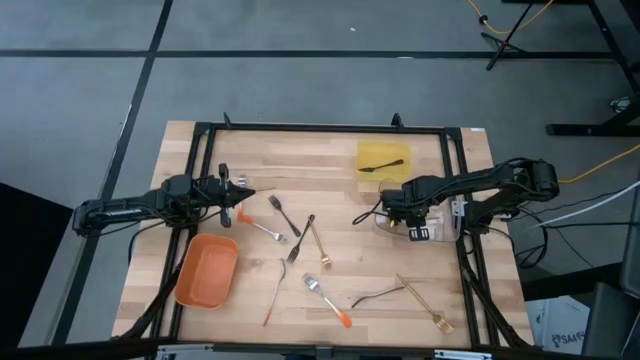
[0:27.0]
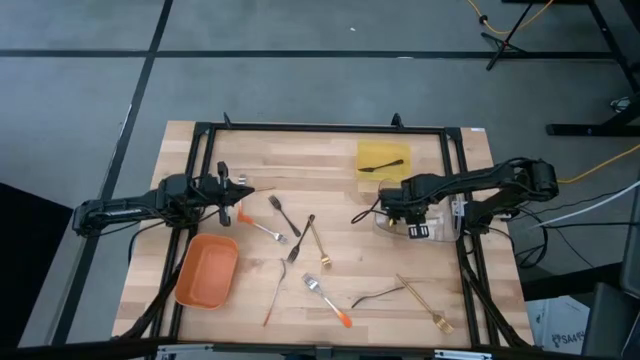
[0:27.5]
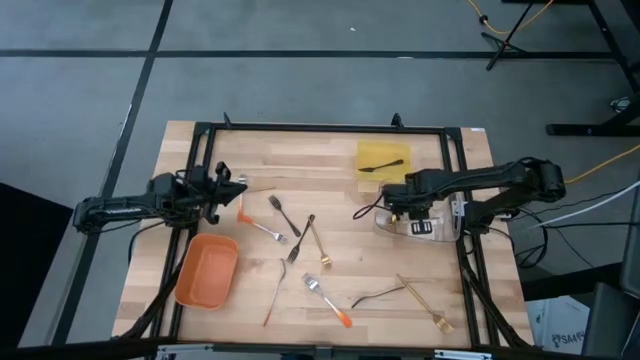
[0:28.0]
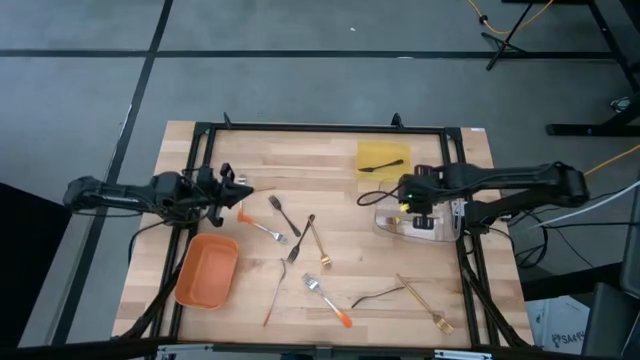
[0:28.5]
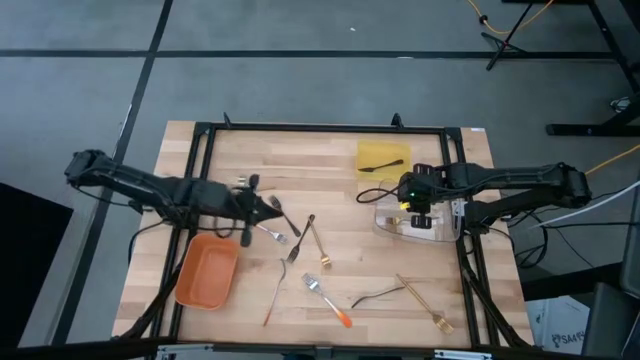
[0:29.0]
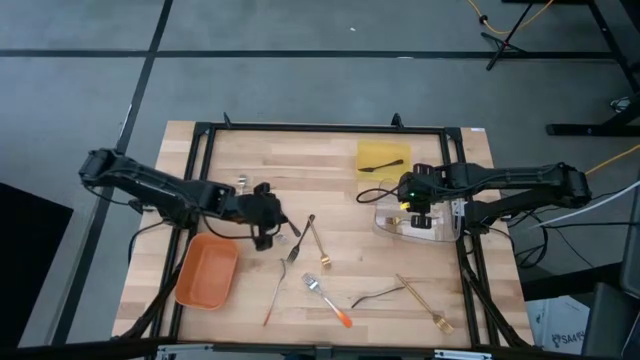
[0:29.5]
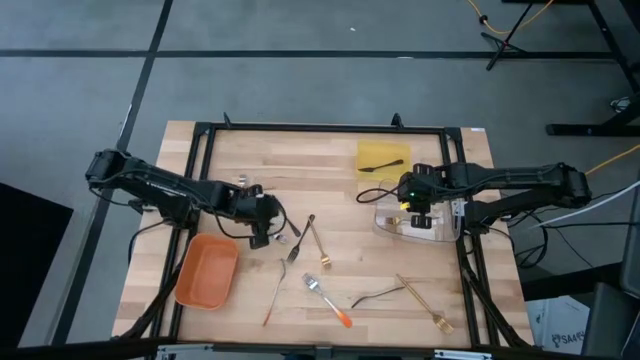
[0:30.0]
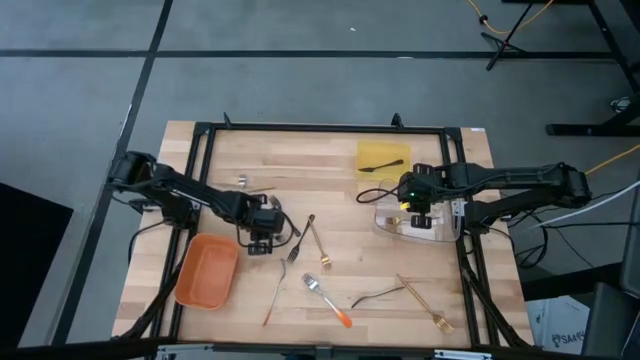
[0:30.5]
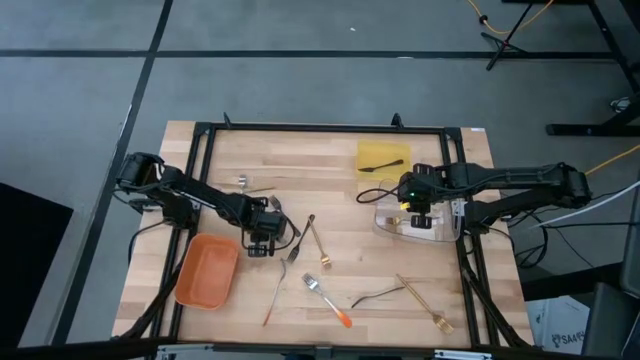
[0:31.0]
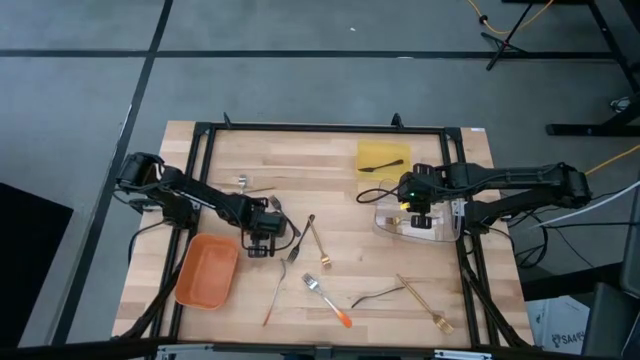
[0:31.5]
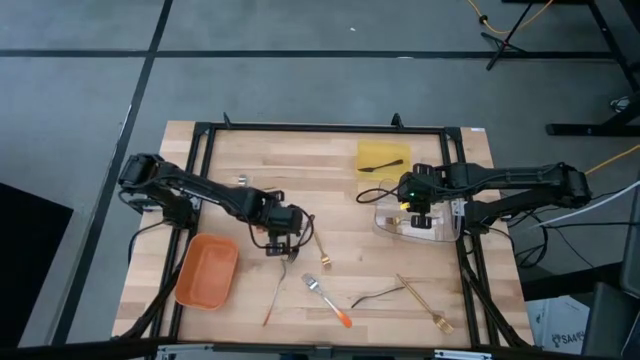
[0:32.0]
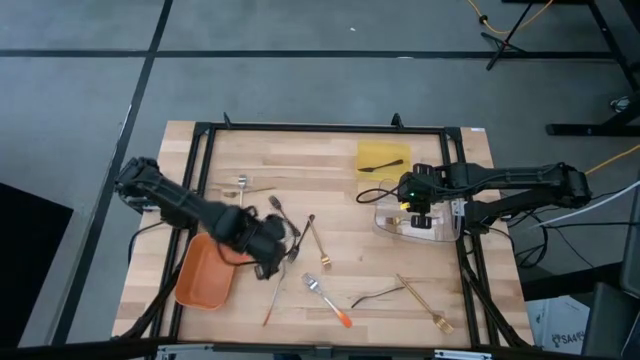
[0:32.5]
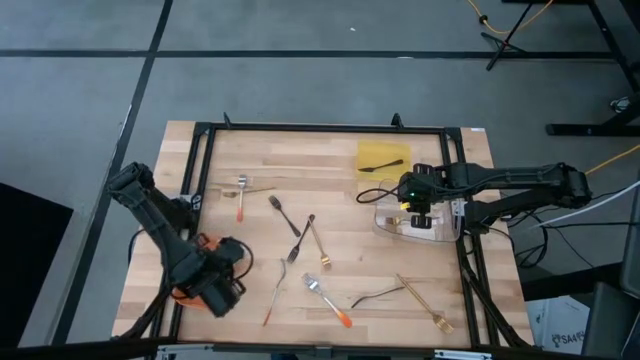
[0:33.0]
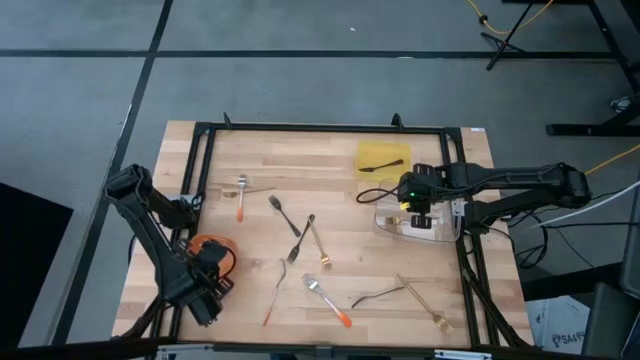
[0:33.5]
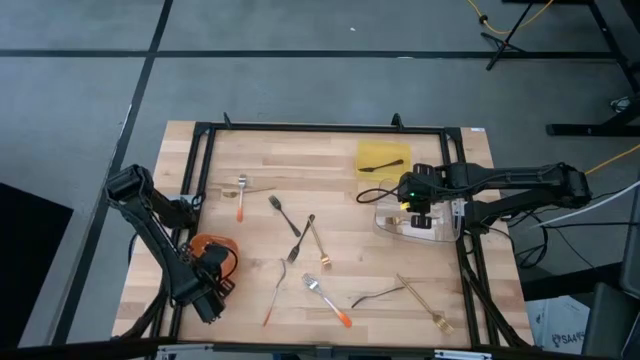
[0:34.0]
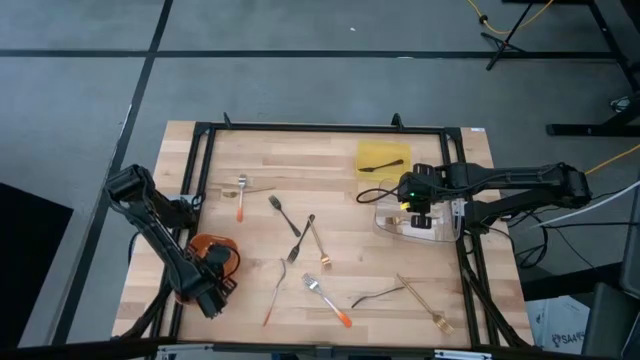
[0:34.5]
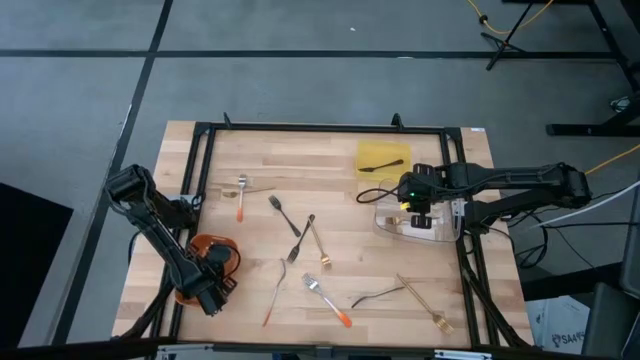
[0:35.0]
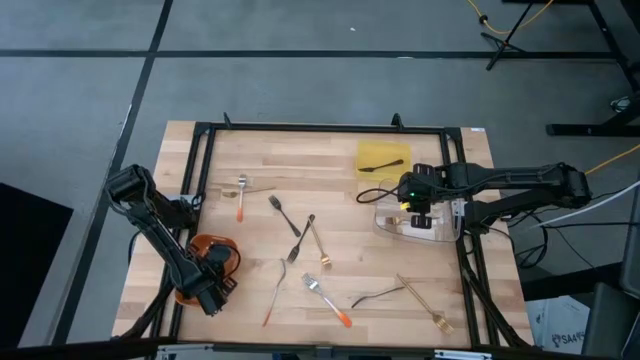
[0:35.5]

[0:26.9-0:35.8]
Task: Sort silverware by color (type)
Put the orange fork into the orange bin

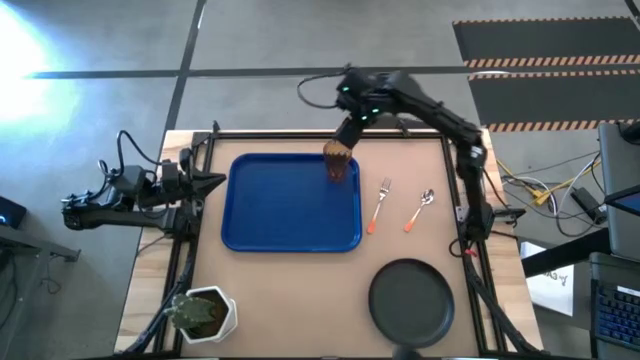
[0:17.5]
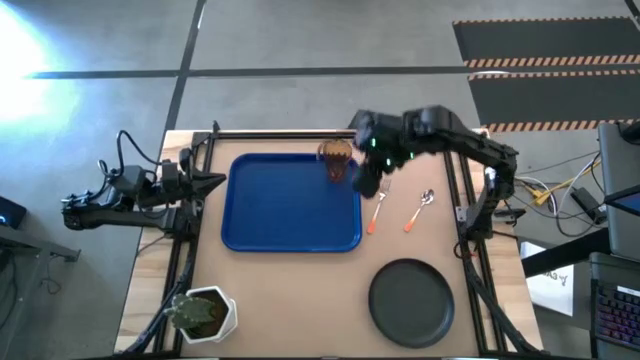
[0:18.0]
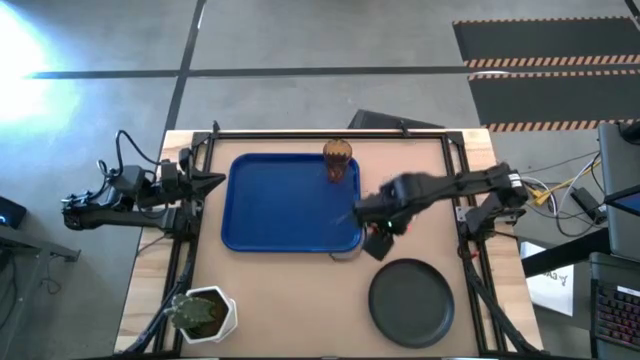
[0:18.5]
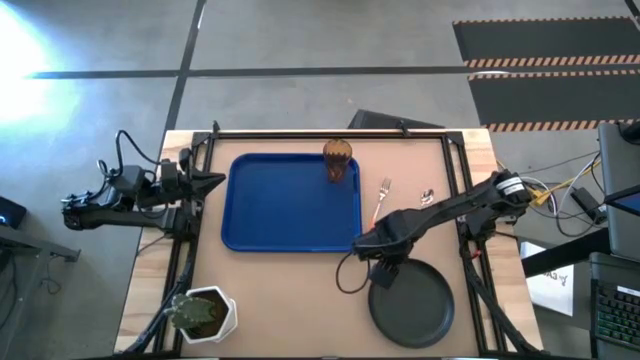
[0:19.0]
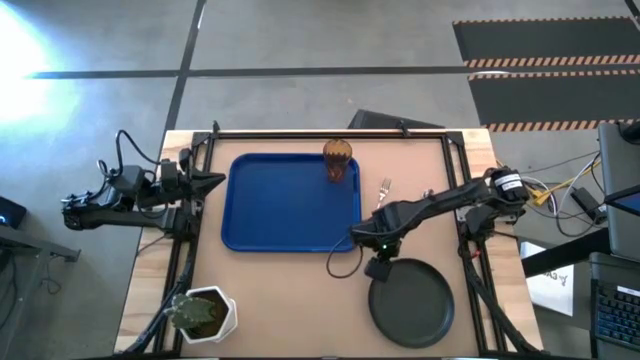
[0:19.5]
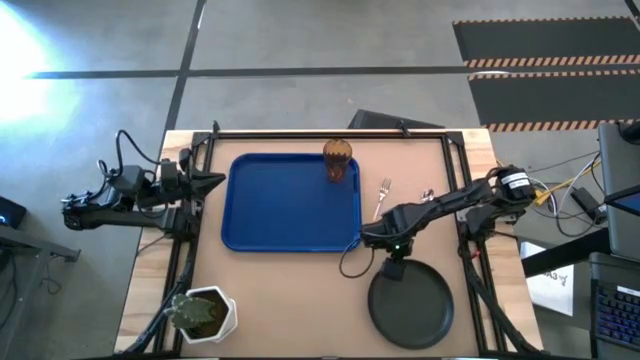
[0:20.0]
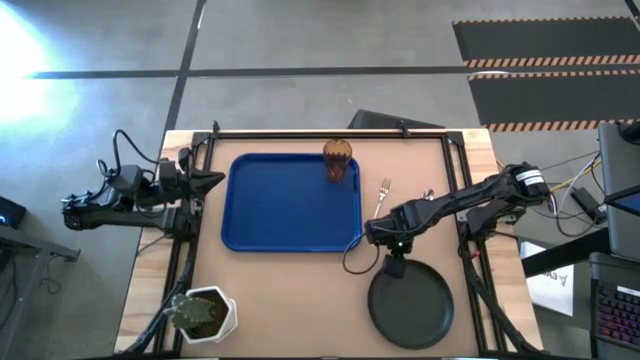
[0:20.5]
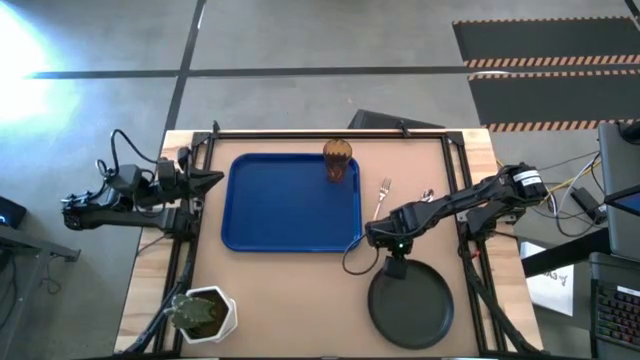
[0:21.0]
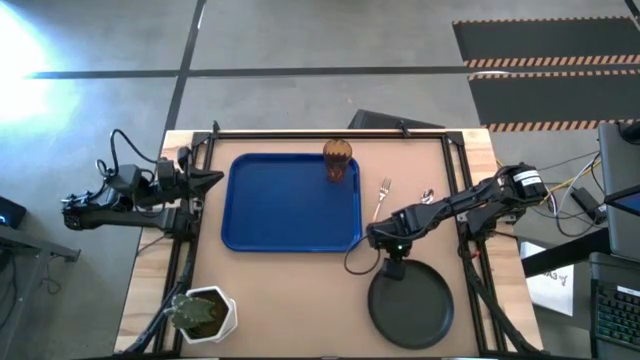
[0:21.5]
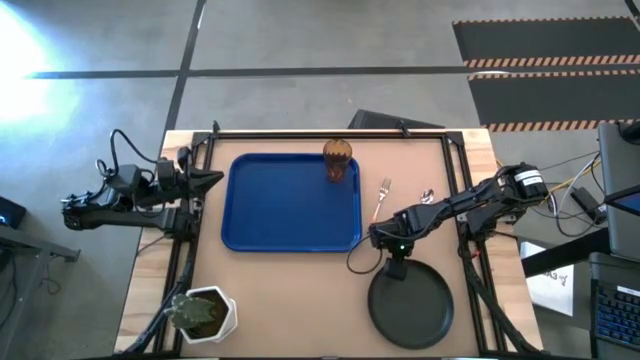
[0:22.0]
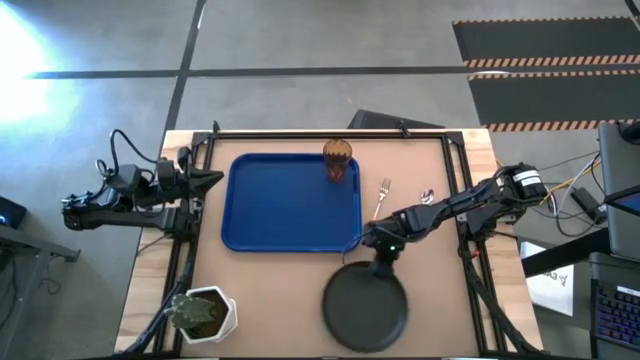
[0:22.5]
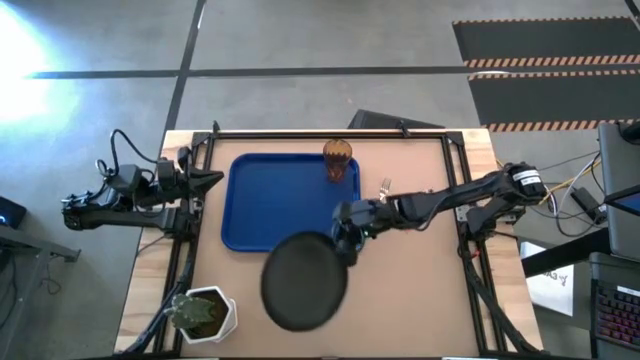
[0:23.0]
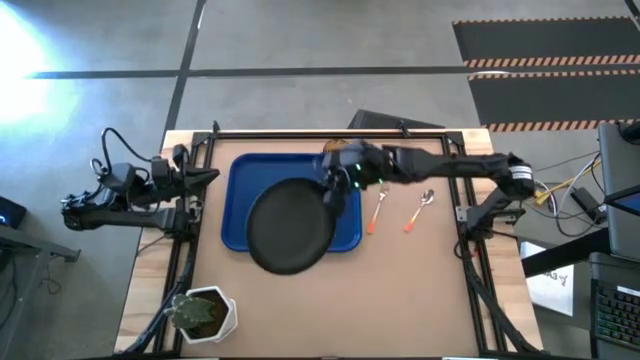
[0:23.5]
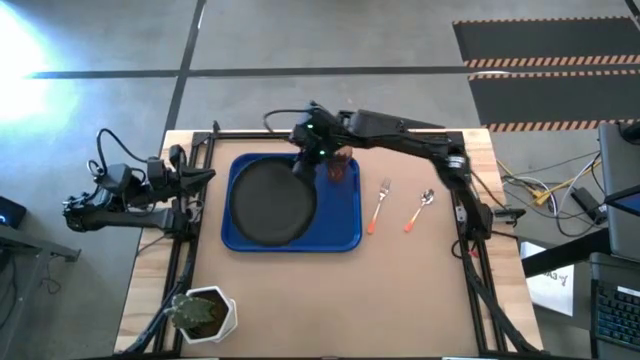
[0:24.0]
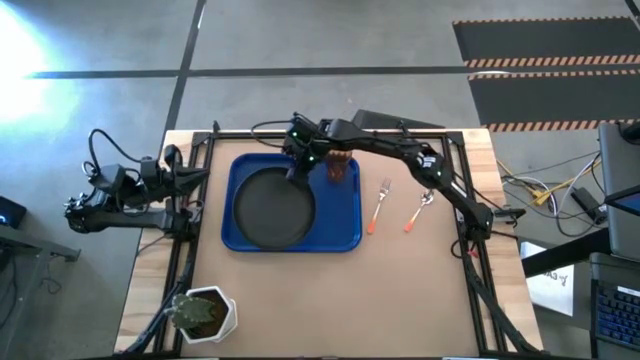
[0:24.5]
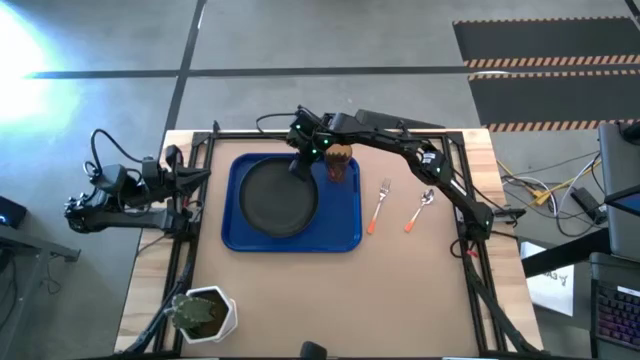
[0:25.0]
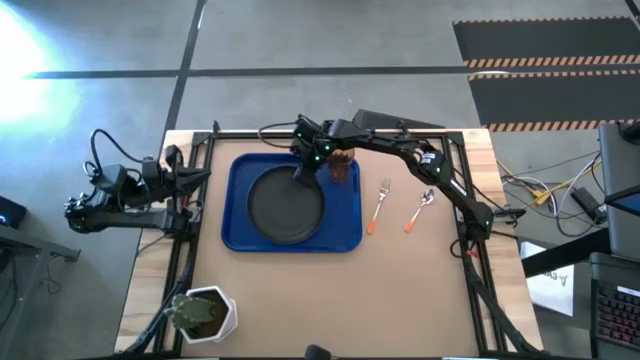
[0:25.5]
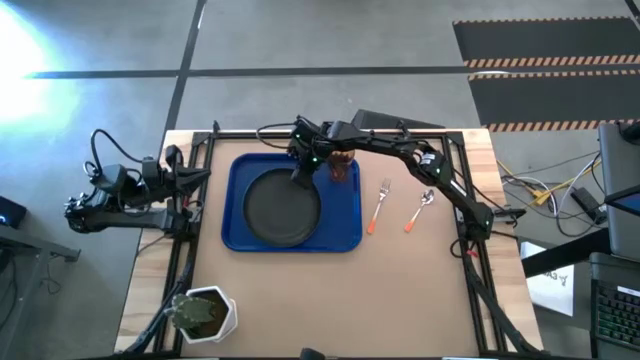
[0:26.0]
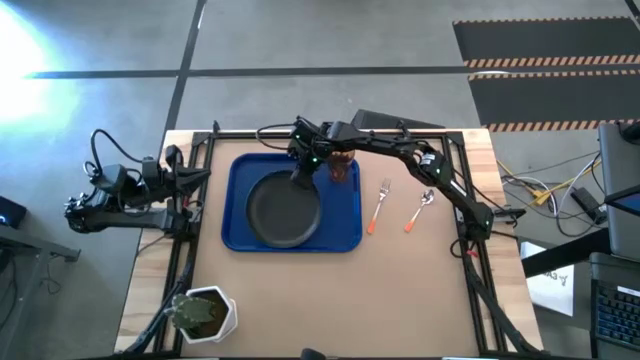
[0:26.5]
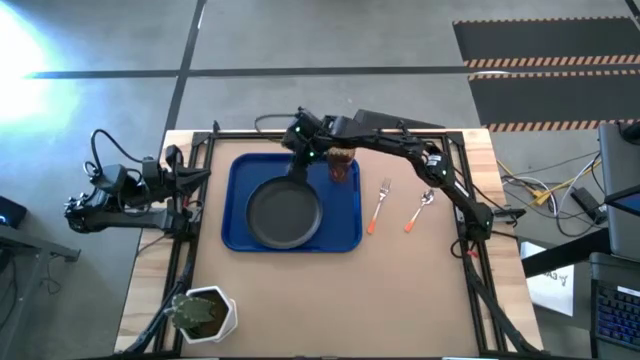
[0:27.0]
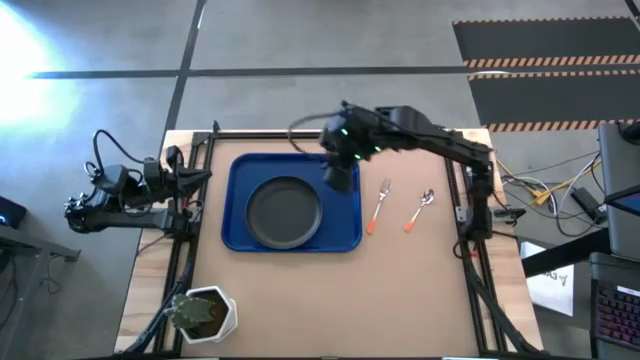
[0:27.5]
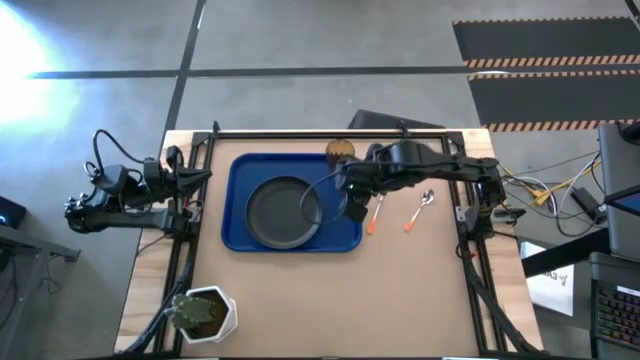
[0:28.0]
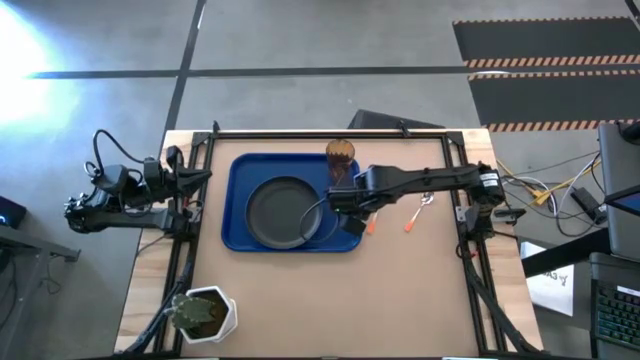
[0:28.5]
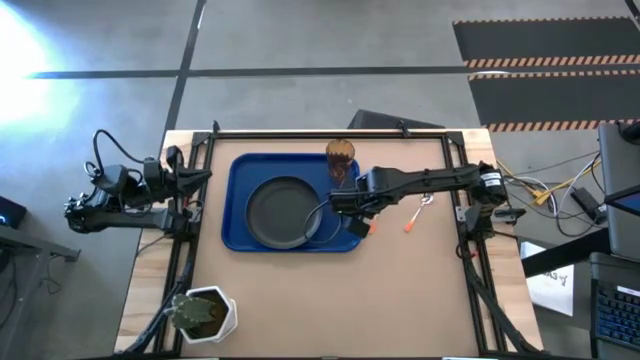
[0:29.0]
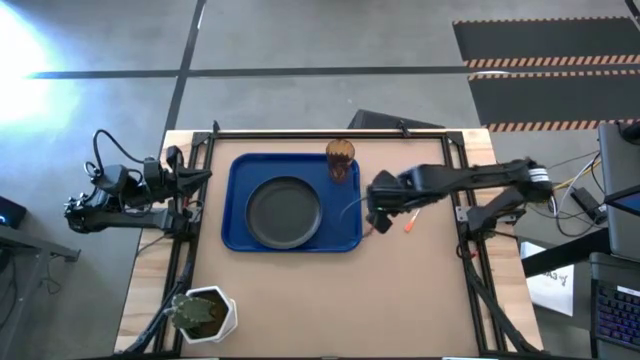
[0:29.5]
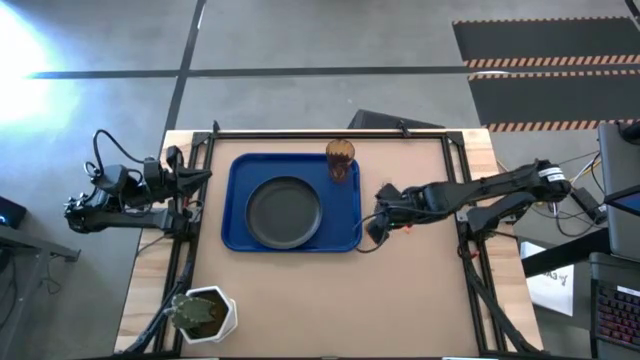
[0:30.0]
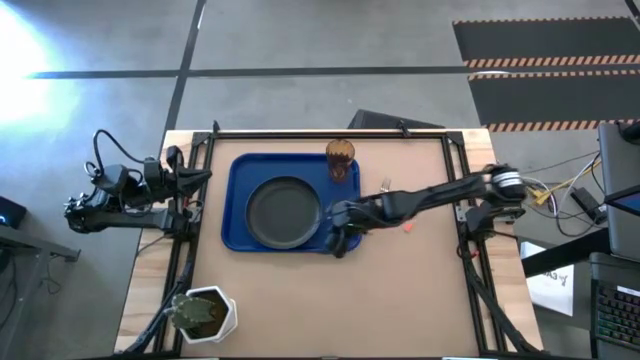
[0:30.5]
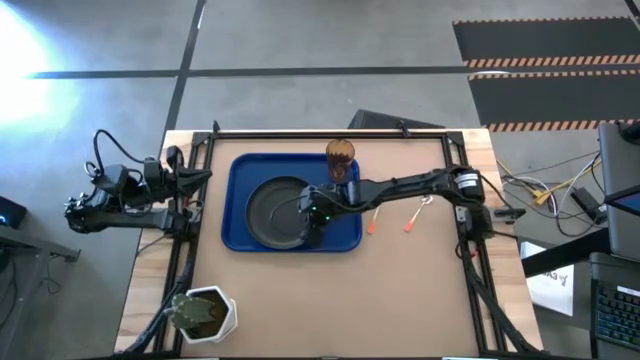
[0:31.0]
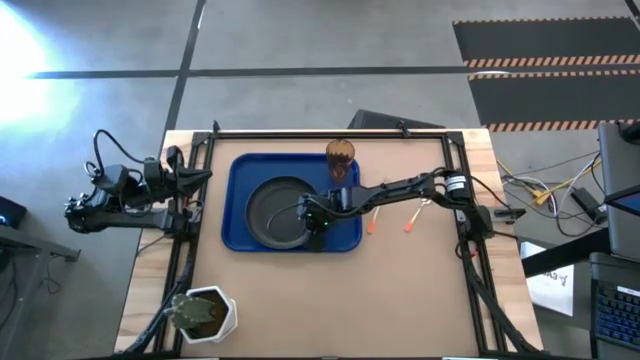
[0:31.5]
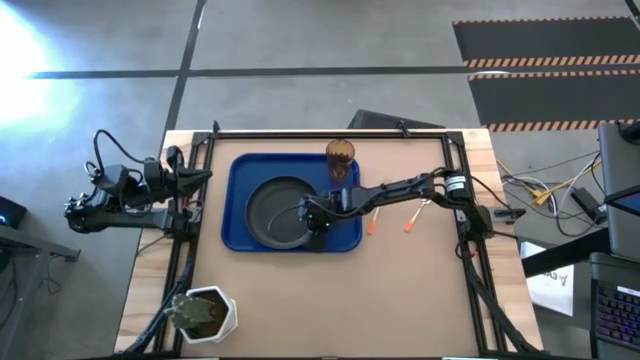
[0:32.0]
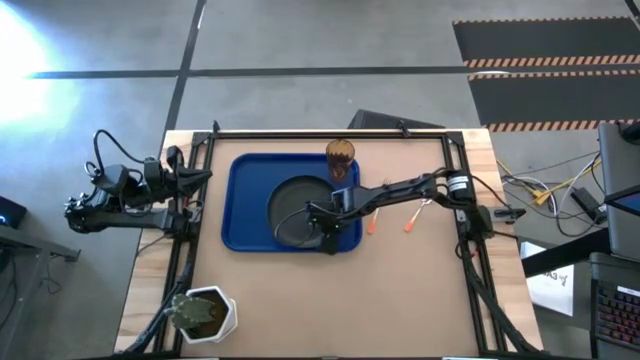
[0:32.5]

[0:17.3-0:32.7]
Task: Pick and place plate/cup/fork/spoon on tray
Put the black plate on the bottom left of the orange cup on the blue tray
